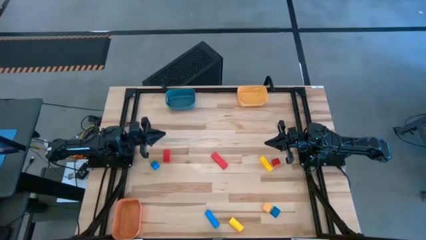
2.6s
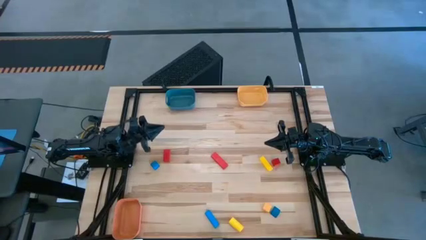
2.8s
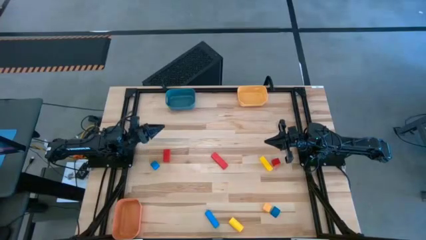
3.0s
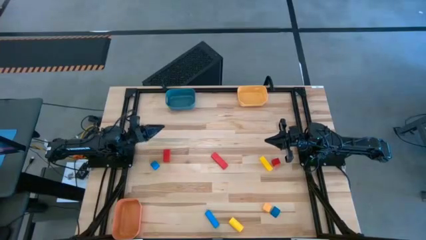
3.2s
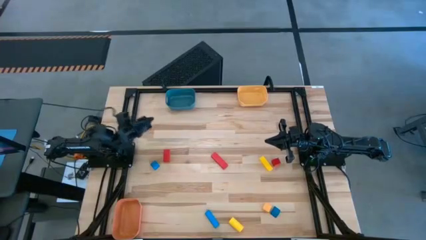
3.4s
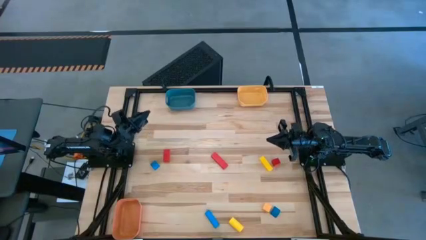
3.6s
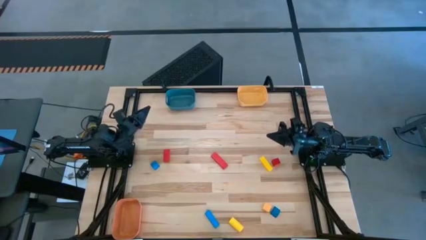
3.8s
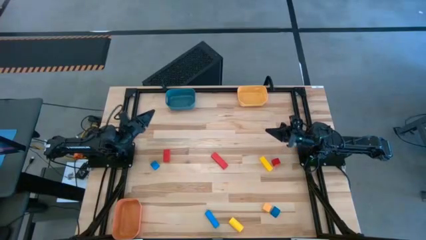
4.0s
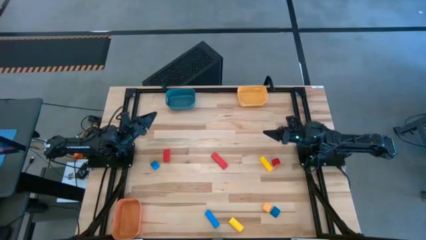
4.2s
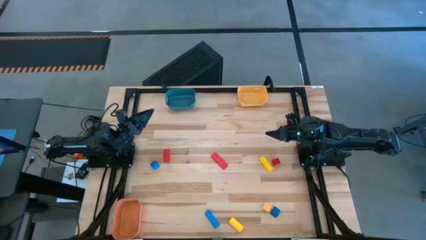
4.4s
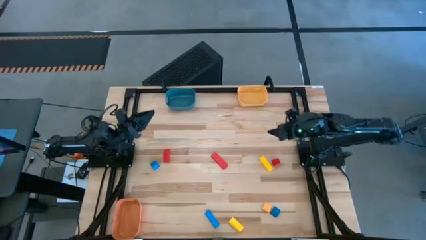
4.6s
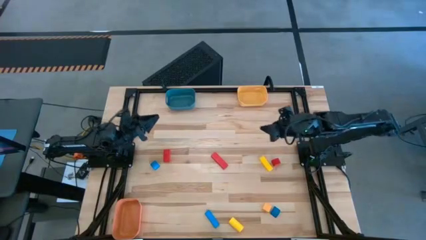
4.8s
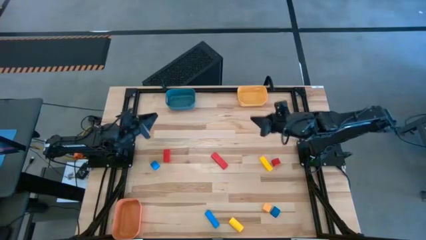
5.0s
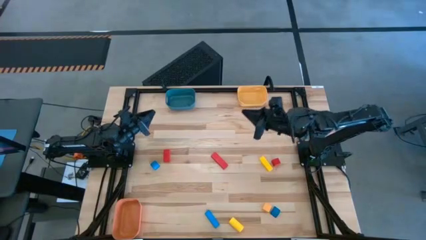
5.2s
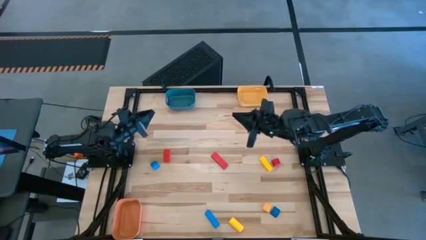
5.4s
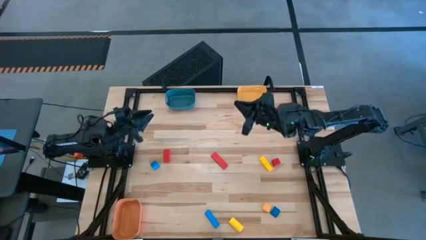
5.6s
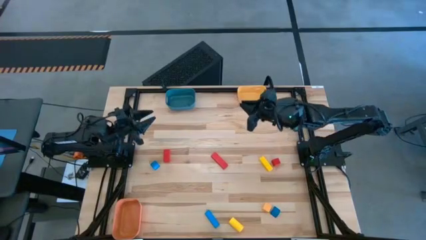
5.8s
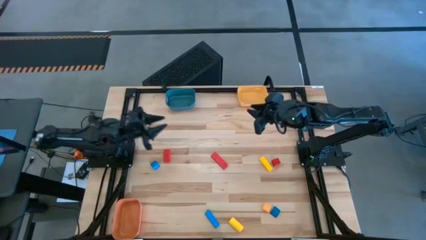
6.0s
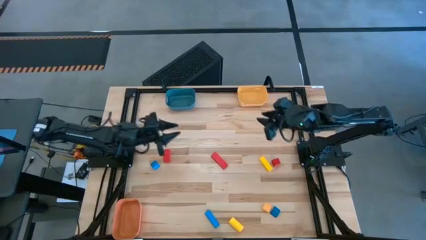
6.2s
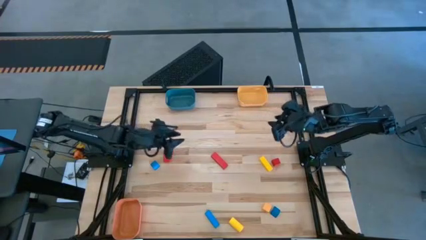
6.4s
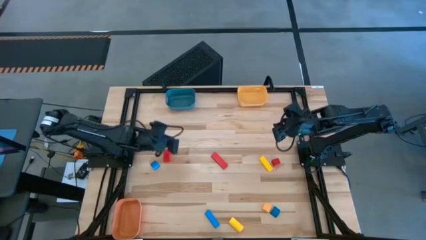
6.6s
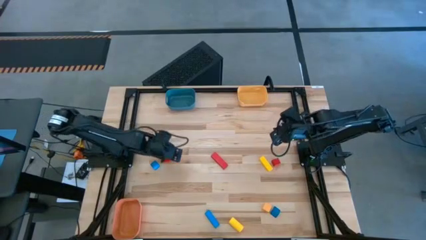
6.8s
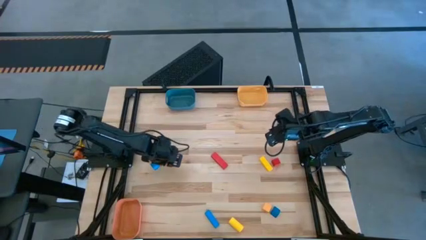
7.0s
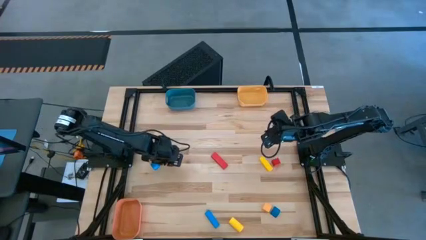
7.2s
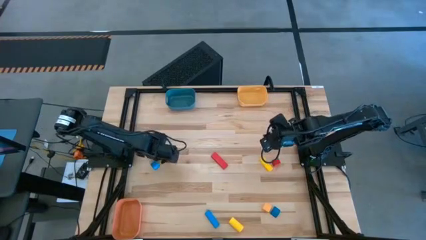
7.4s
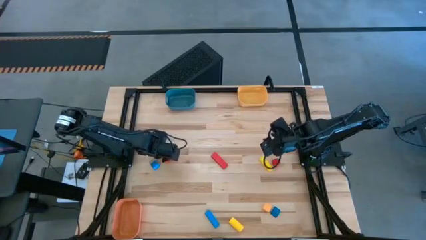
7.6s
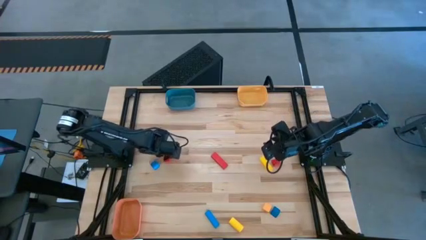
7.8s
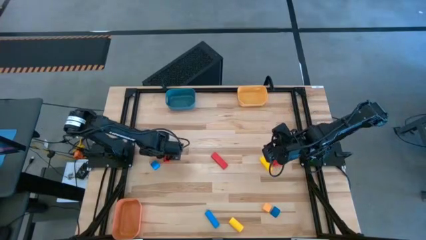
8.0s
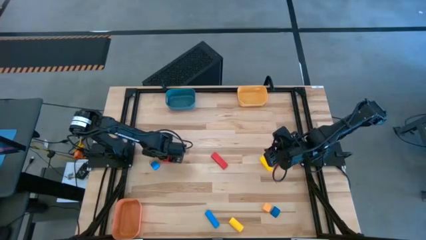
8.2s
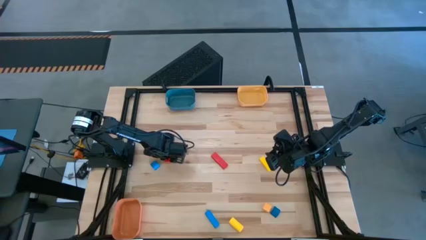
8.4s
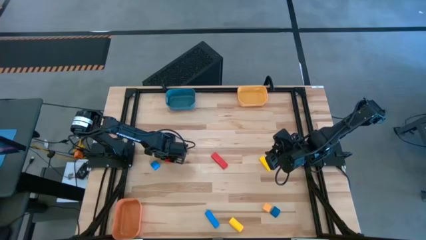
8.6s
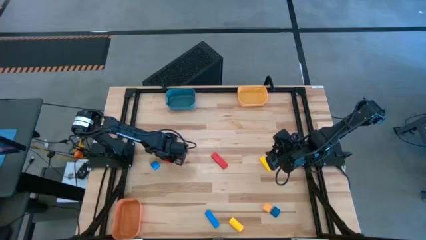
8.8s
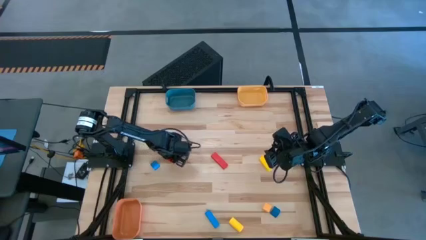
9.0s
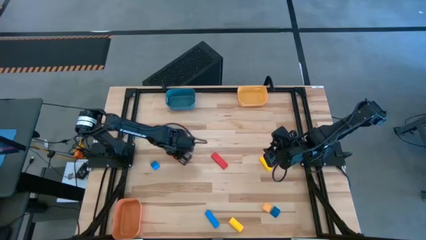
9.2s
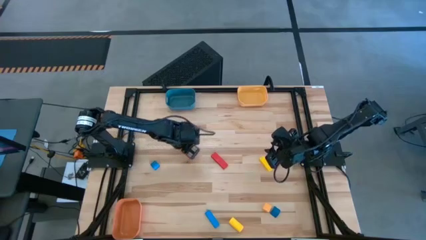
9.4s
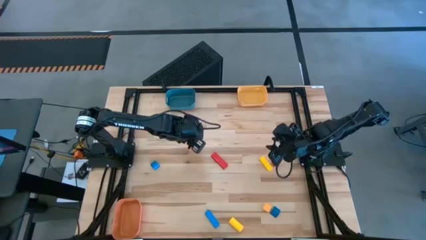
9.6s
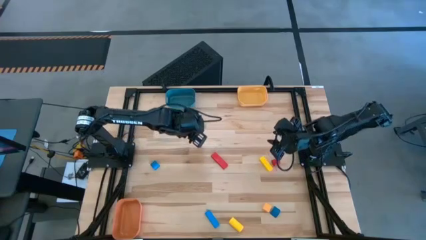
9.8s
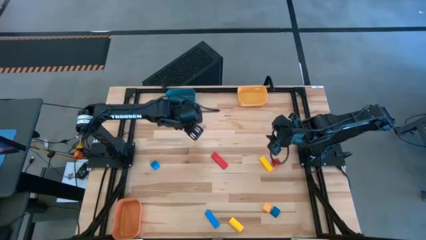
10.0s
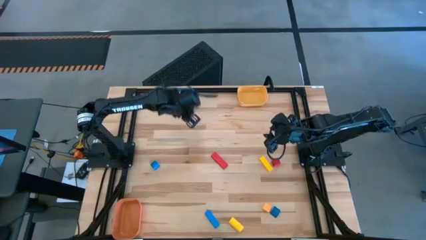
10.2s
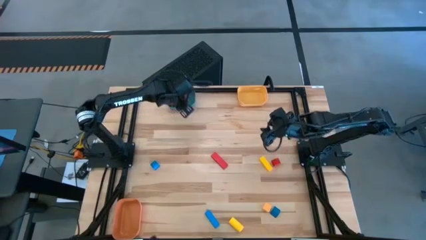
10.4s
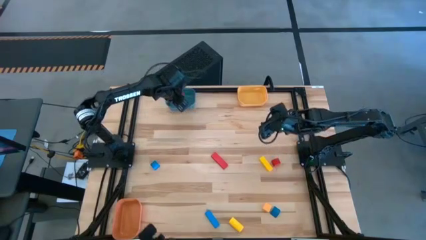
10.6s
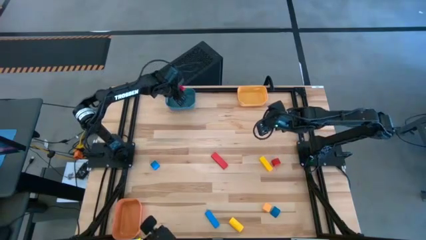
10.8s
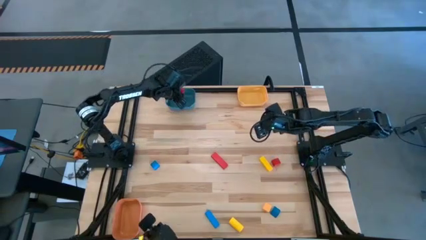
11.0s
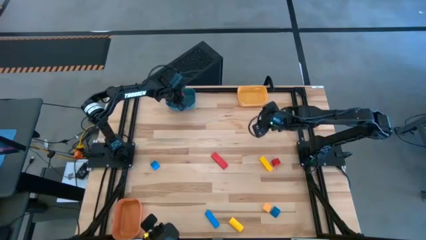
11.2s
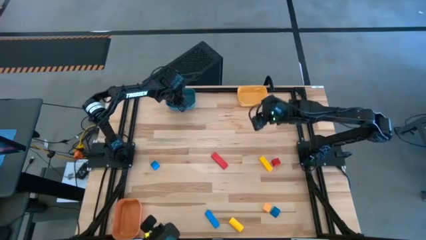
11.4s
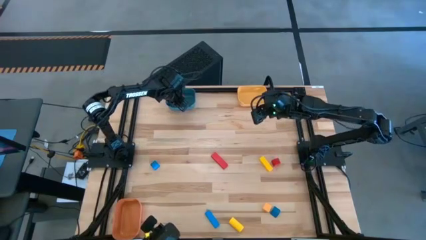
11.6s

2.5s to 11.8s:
Task: Sort & place blocks by color
Put the left red block into the blue bin

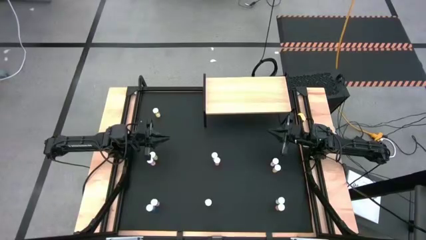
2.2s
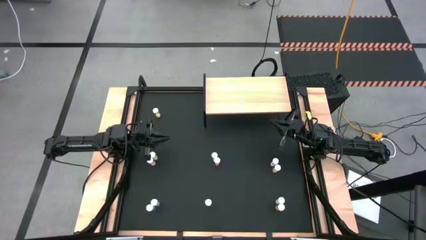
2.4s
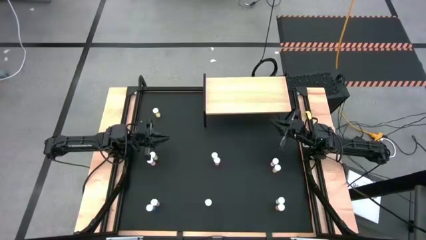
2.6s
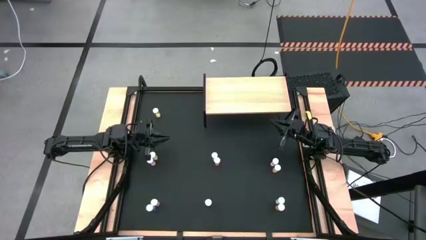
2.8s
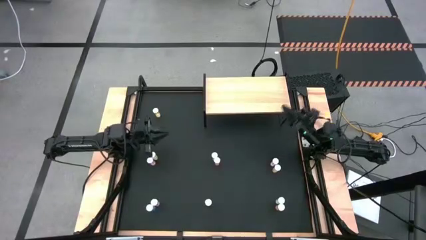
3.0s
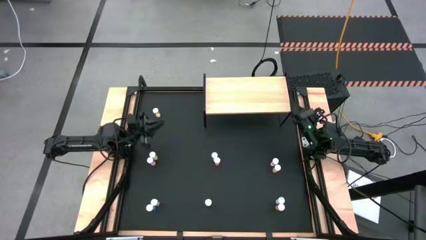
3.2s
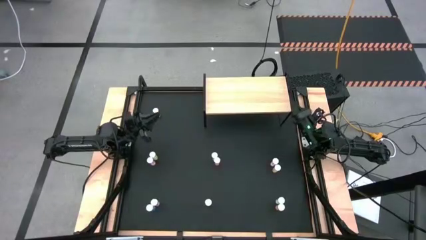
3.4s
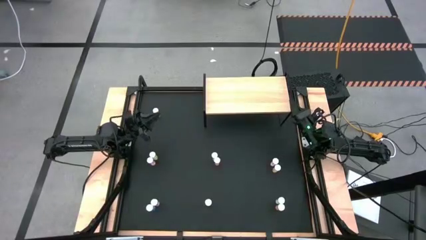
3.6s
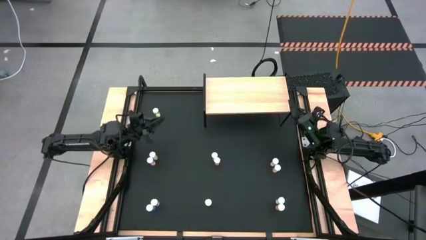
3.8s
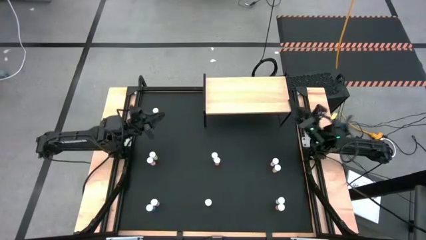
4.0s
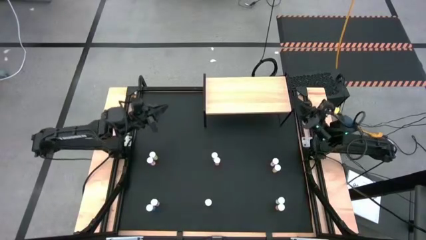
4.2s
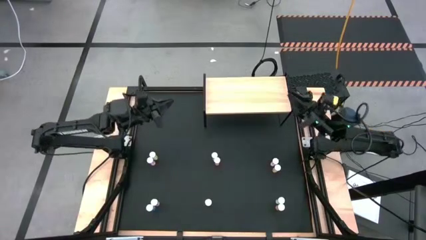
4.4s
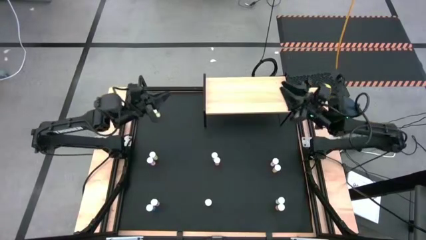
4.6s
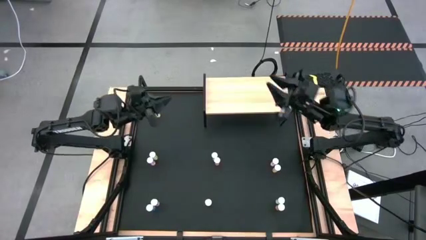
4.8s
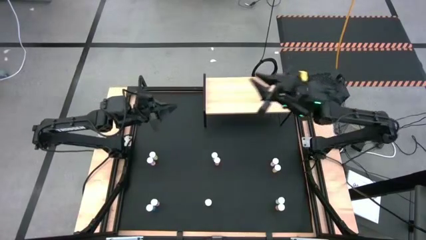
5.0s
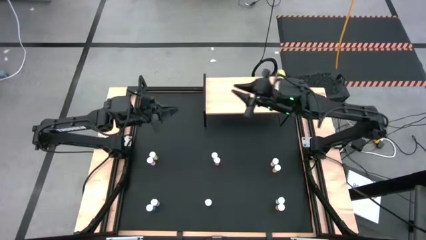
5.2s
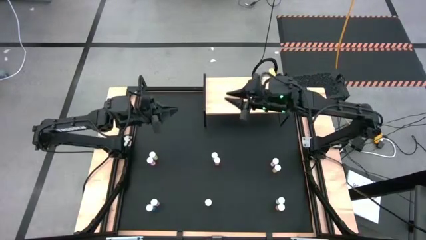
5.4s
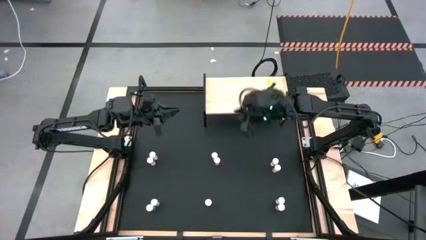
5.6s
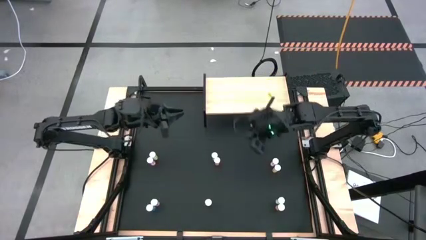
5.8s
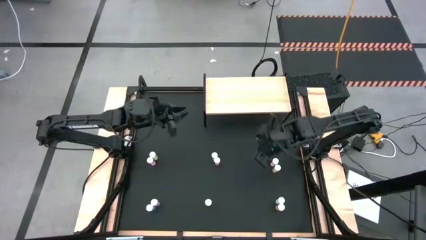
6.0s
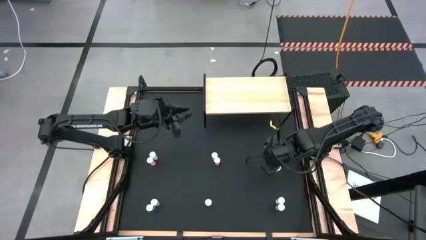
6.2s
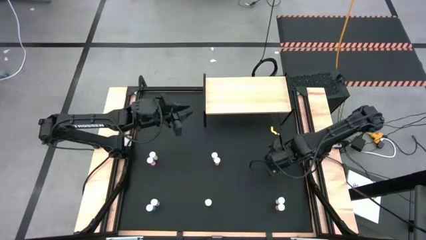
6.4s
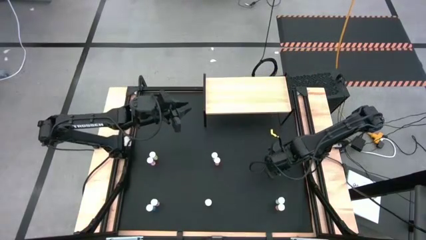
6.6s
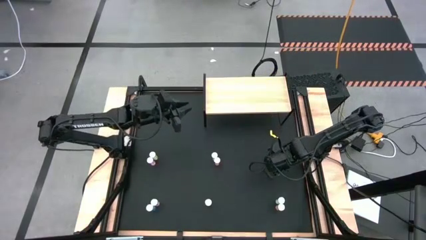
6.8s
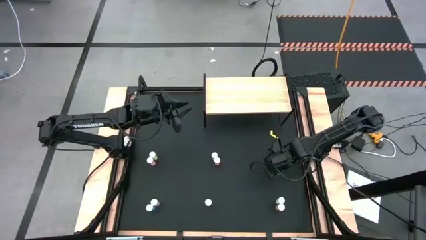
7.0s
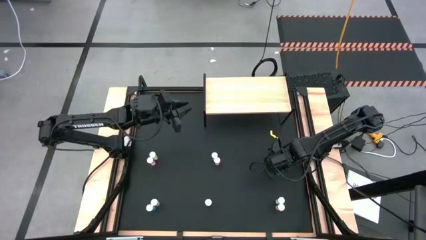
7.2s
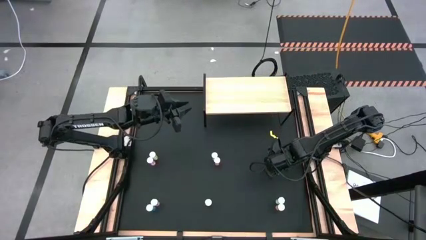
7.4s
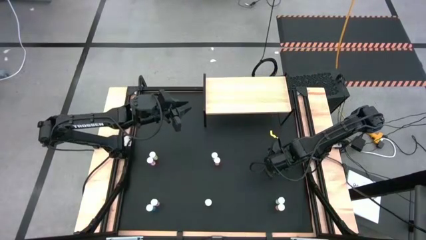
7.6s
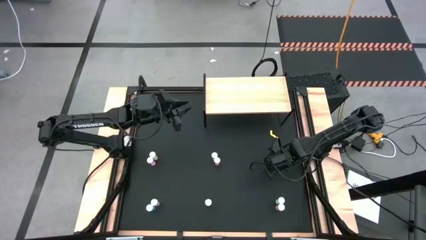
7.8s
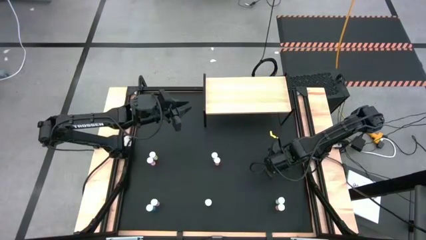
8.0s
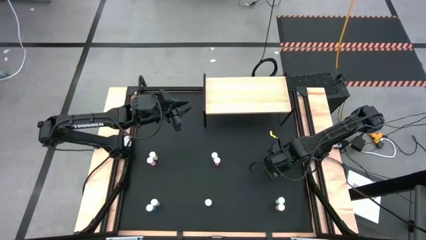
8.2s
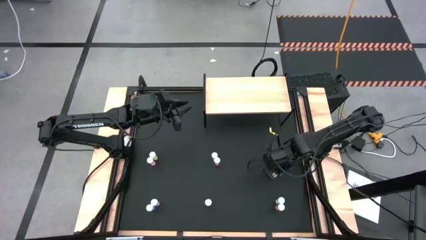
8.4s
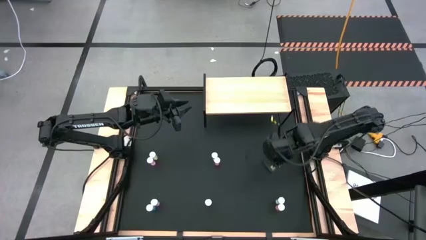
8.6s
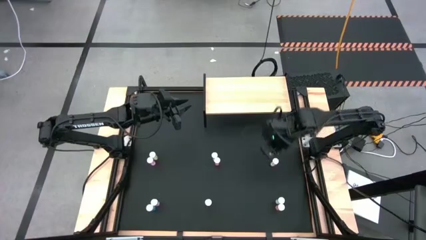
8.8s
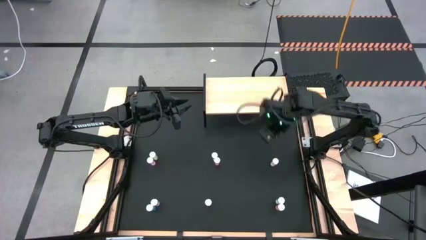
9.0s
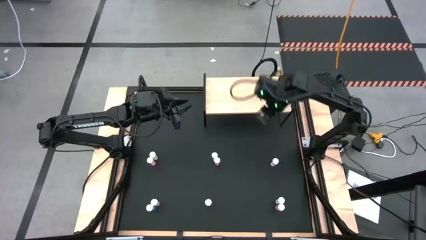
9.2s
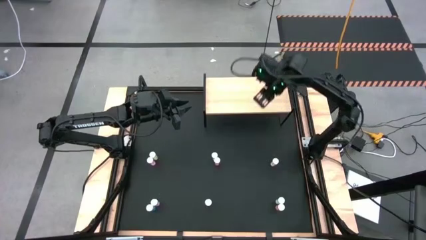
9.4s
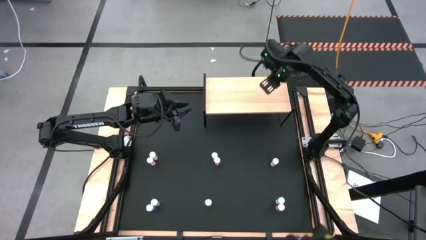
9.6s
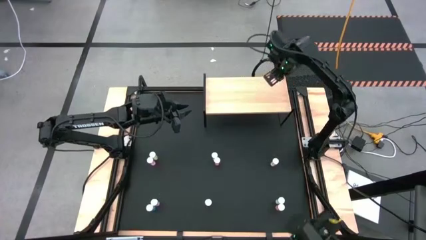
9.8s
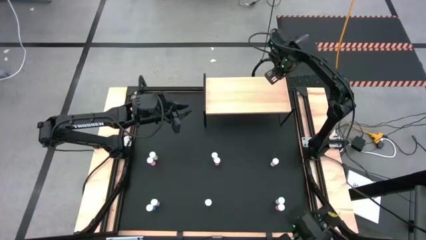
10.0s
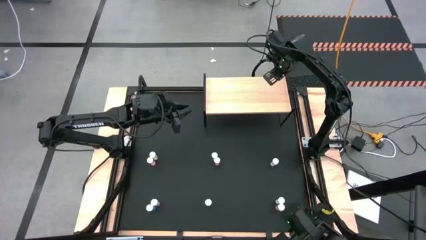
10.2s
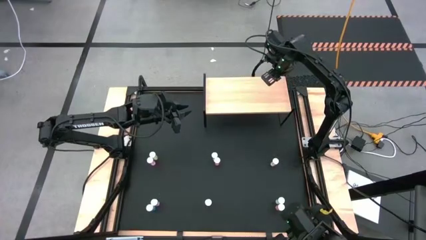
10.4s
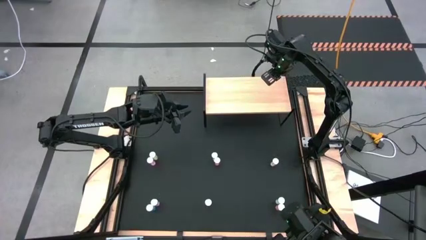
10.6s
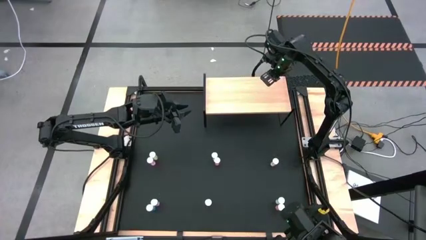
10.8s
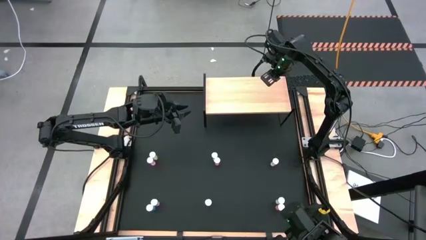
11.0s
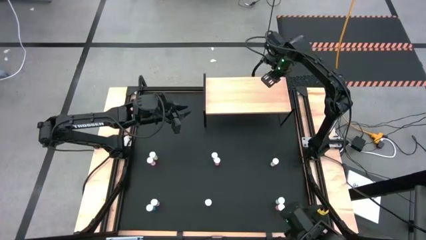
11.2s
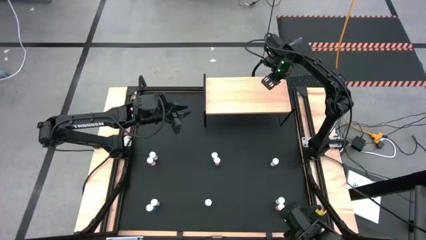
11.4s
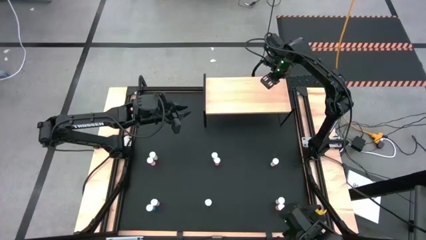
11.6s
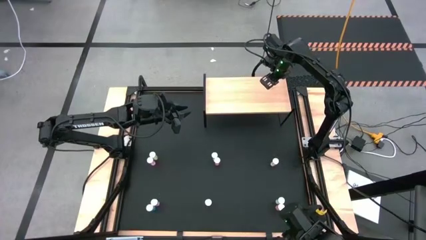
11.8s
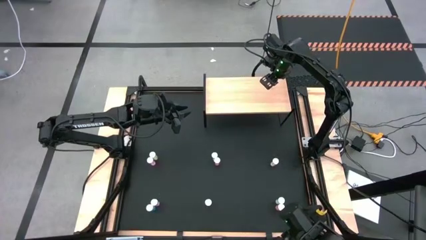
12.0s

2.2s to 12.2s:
Task: Pick and place medicine bottles onto shelf by color
Put the bottom right yellow pill bottle on the shelf
